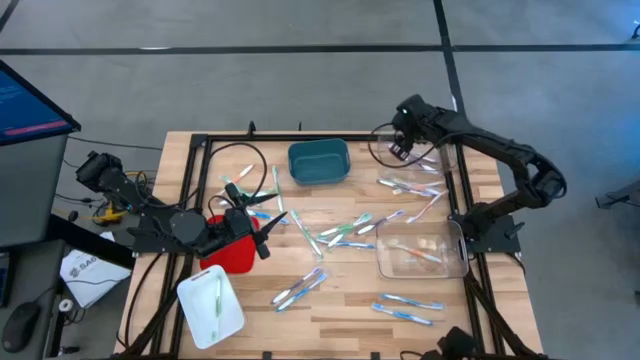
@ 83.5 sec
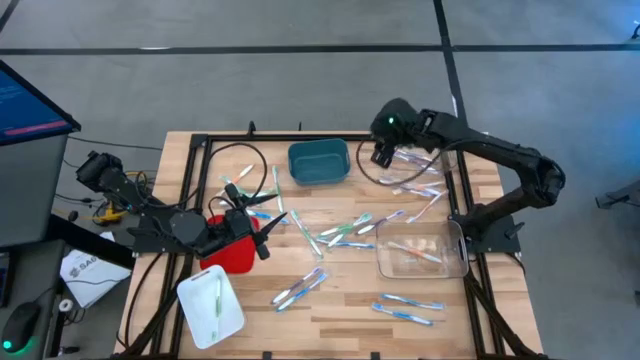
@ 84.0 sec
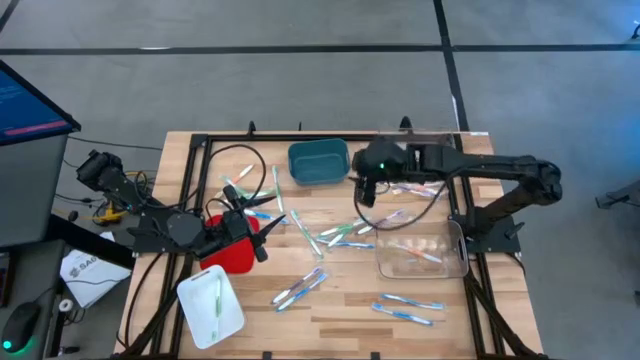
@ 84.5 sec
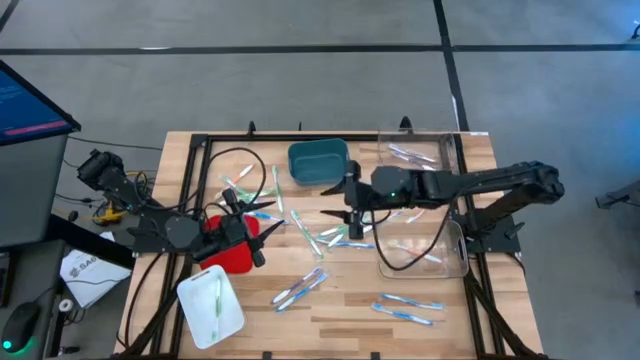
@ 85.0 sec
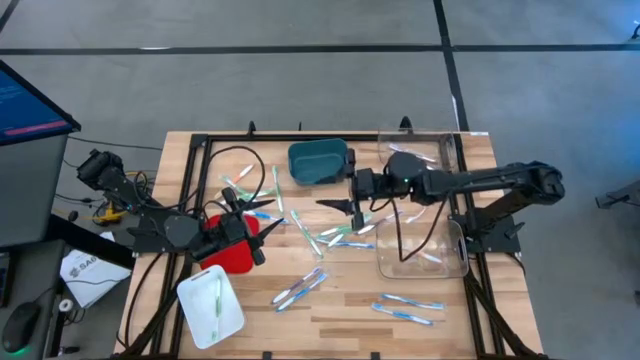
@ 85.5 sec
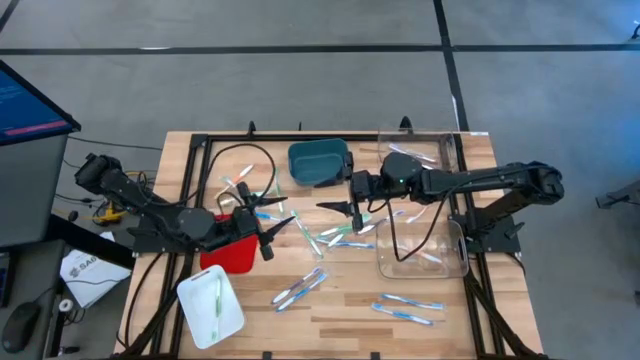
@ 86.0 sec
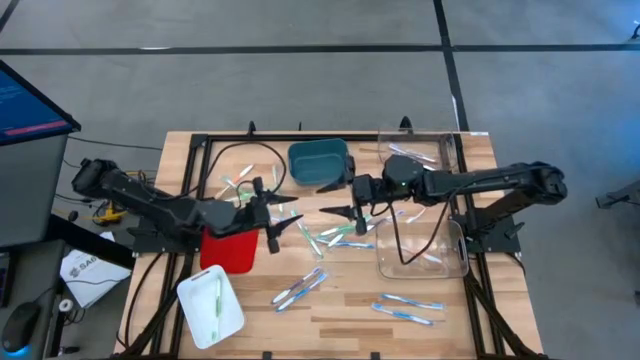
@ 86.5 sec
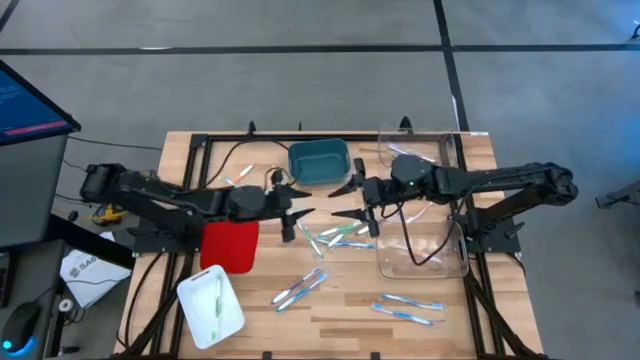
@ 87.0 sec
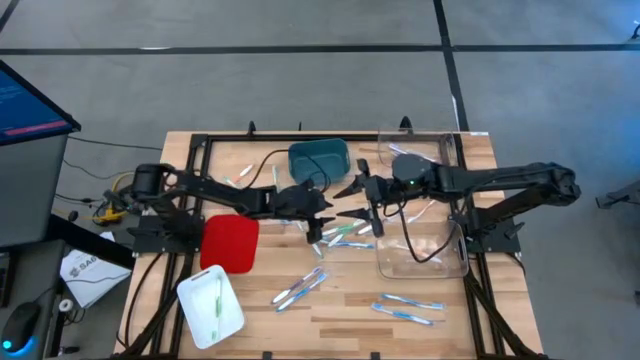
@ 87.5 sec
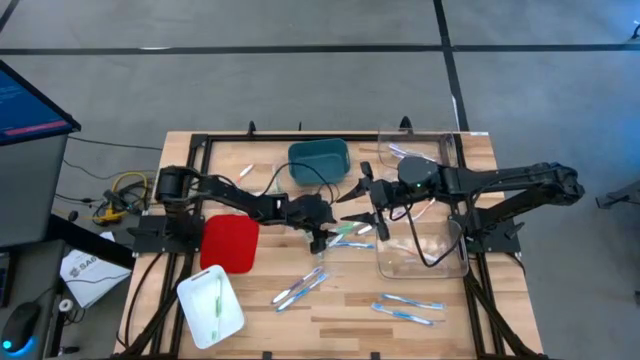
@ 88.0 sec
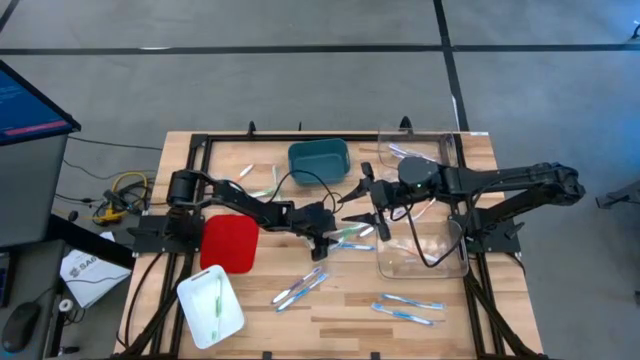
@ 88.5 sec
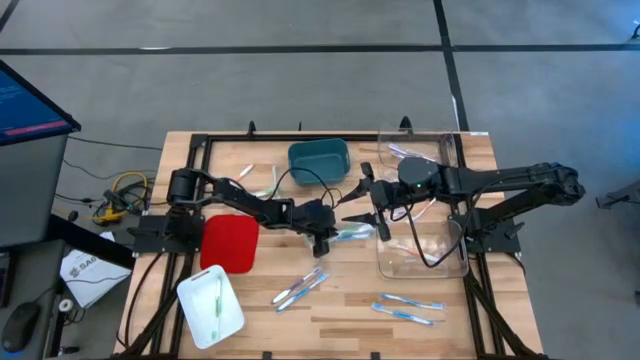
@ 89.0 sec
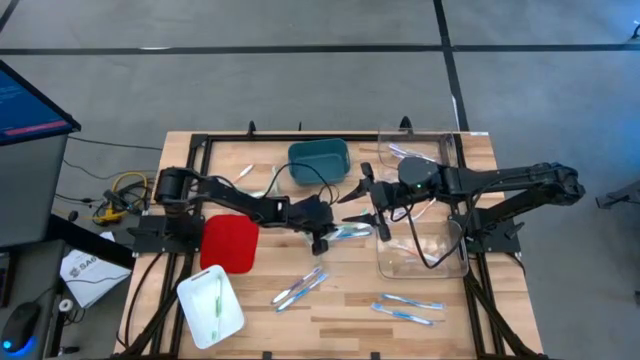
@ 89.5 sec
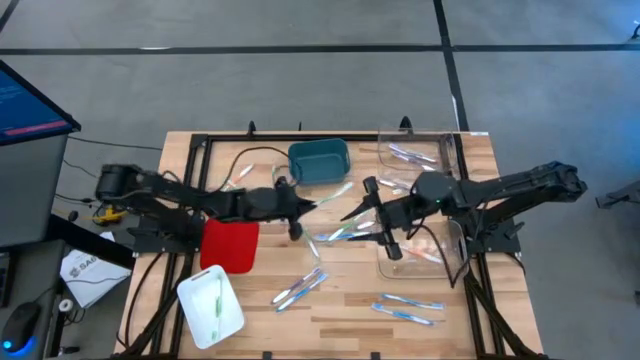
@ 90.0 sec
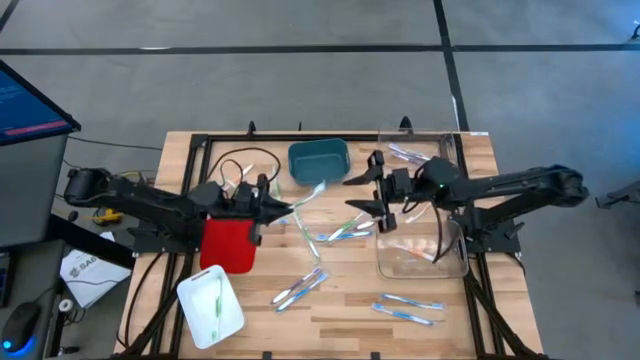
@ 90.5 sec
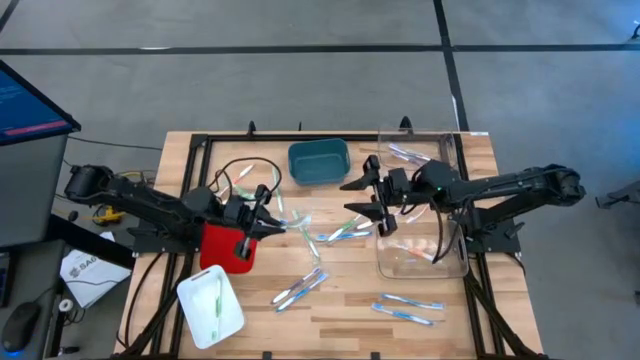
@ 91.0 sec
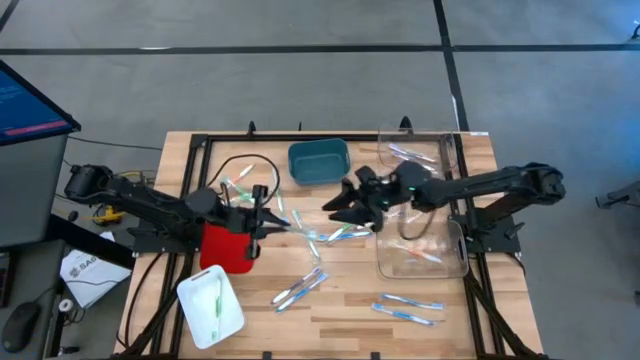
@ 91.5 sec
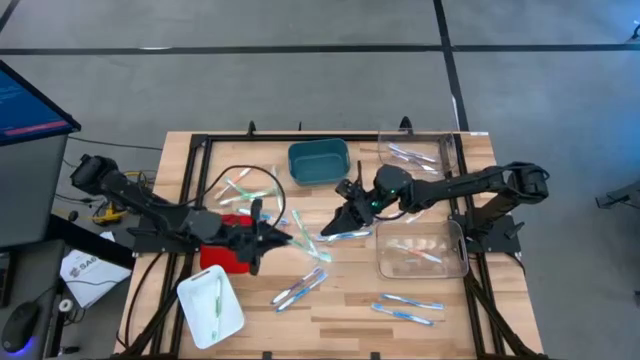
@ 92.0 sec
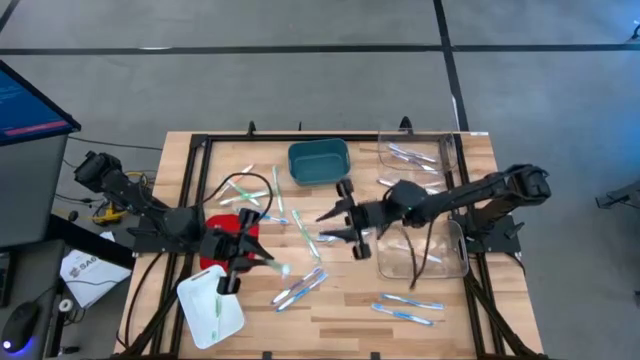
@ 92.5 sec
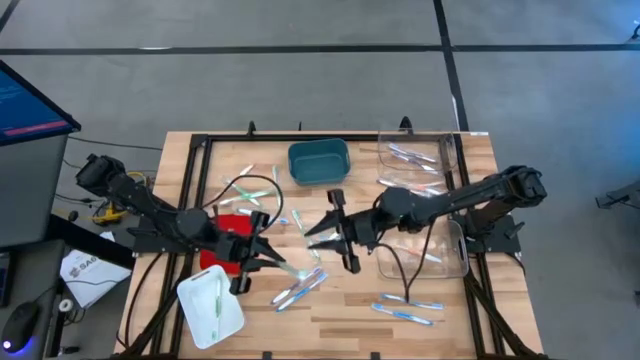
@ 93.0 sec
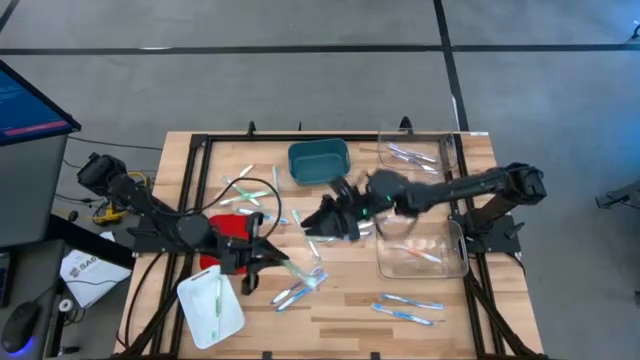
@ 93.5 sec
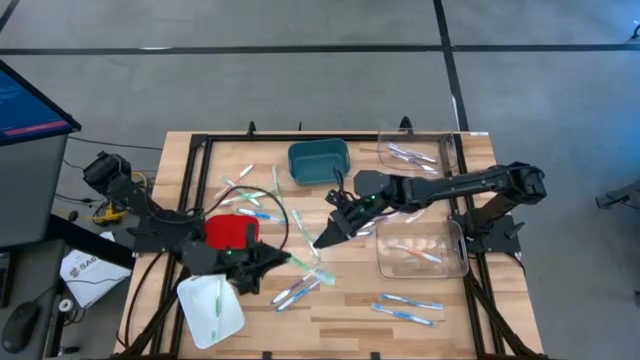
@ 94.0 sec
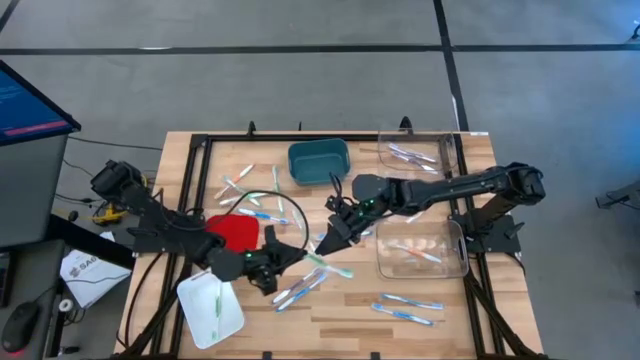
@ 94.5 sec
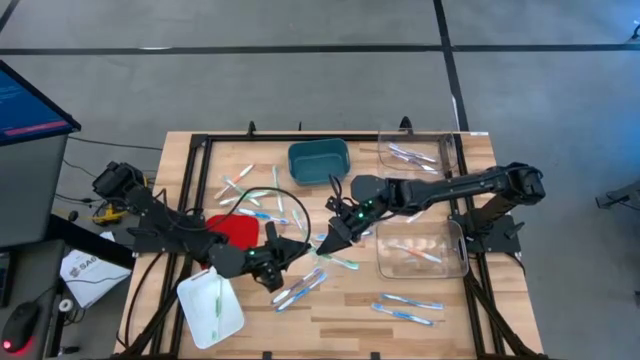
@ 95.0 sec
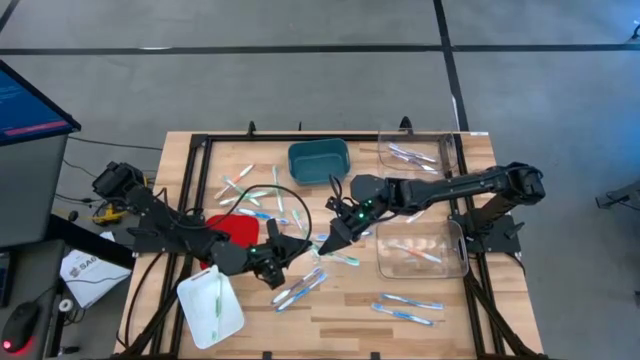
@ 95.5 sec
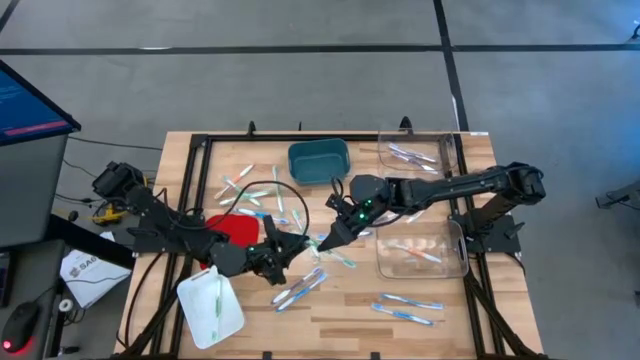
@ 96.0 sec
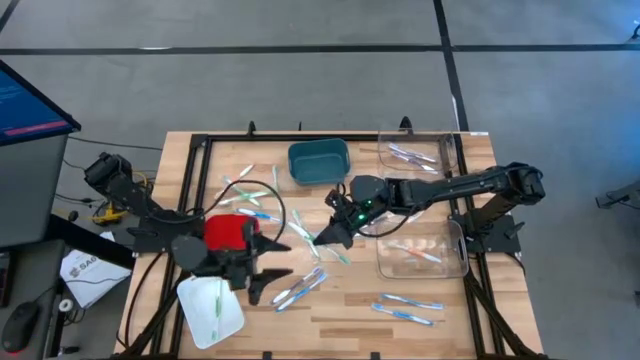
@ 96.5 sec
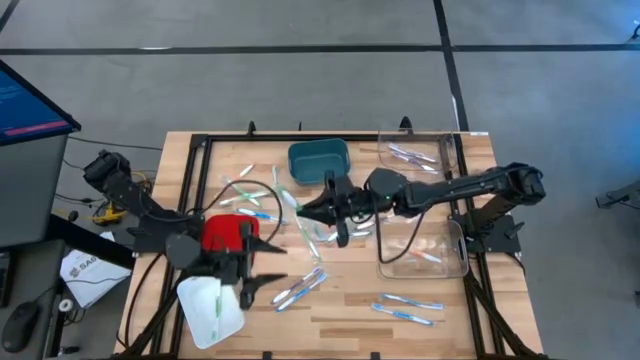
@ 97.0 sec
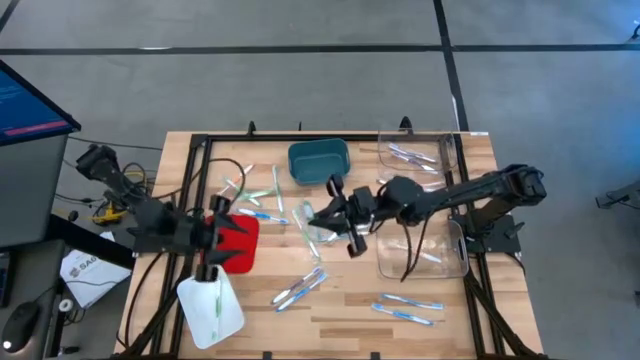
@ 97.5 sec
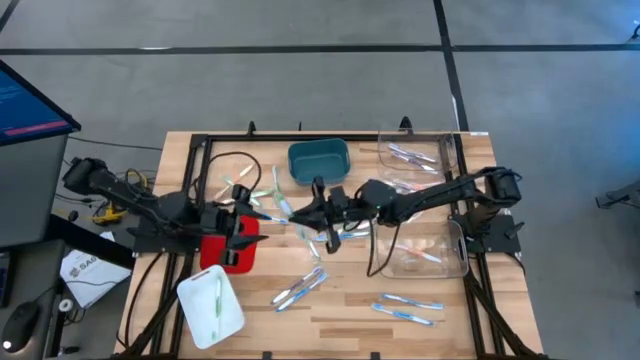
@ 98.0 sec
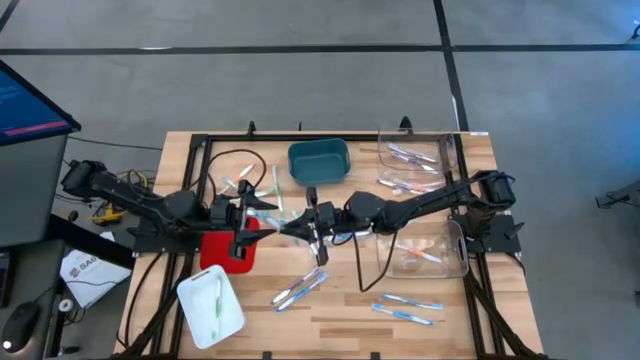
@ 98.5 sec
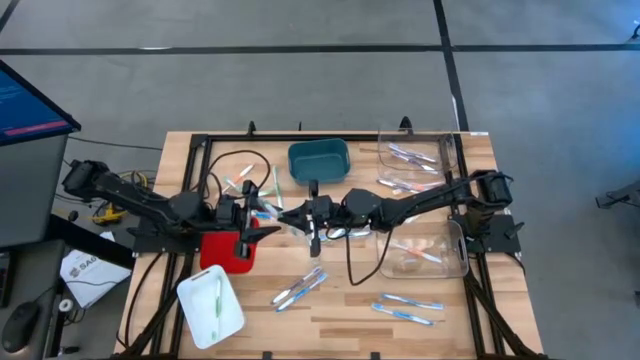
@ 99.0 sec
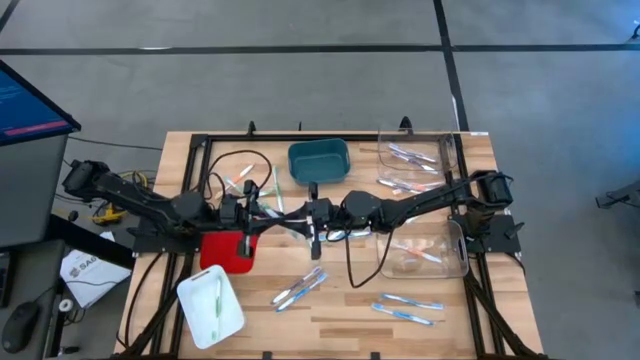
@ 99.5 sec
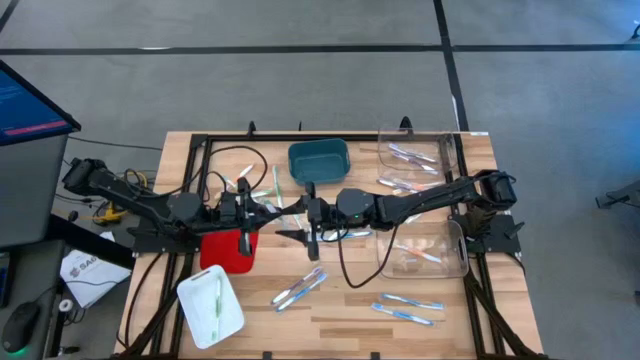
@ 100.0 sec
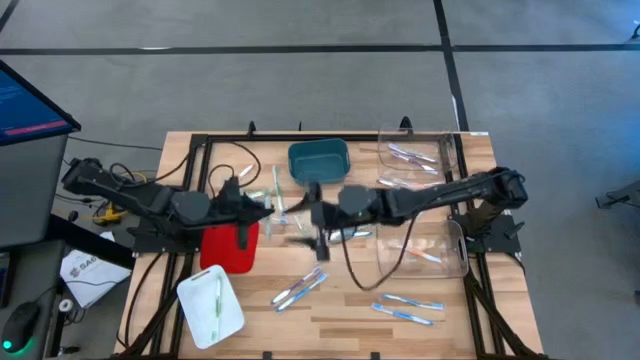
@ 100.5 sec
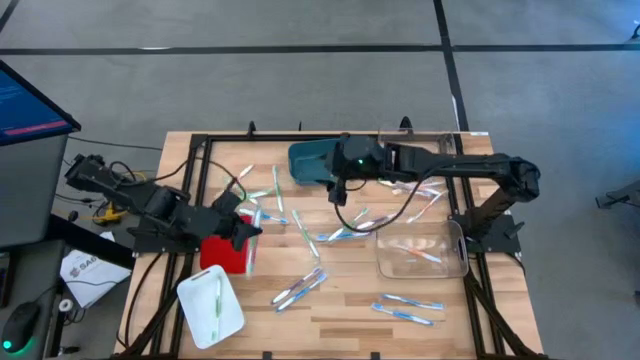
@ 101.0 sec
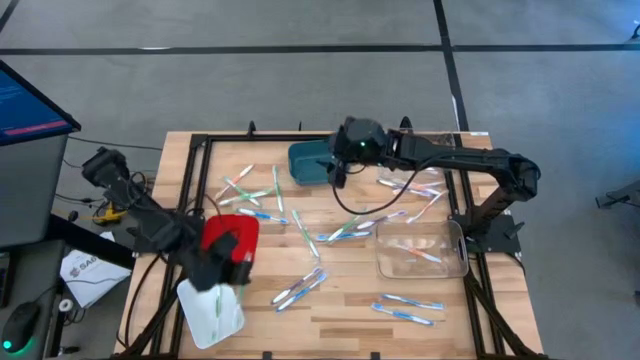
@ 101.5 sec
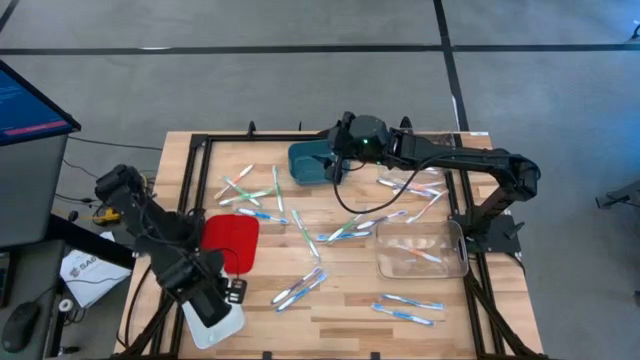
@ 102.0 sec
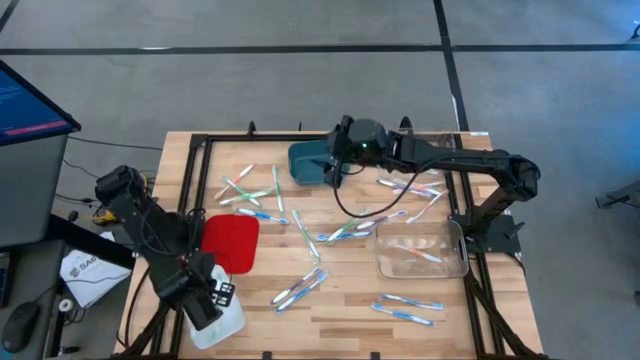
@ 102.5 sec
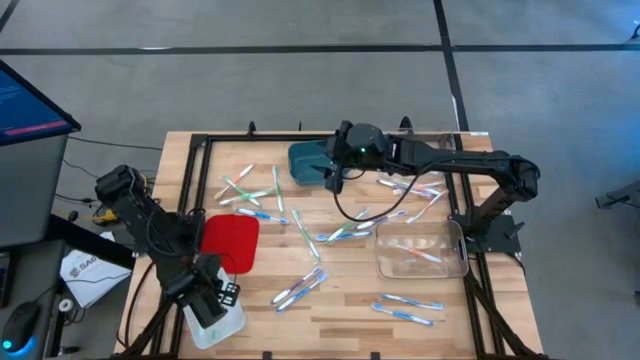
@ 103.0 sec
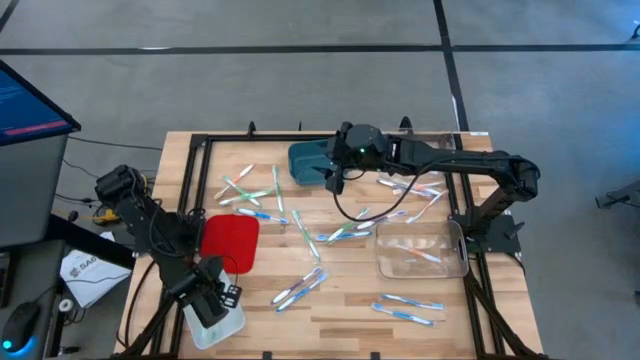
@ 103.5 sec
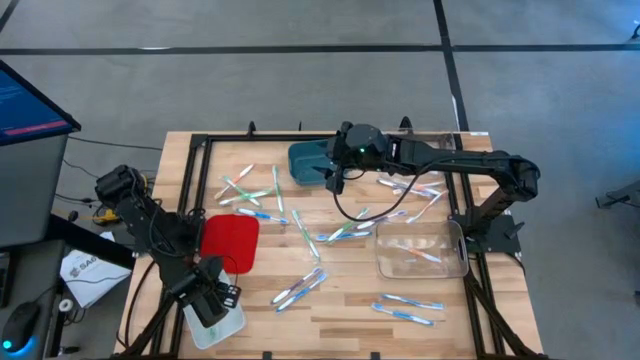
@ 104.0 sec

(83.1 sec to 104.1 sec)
Task: Pick & Place Toothbrushes
Put the green toothbrush into the white bin
